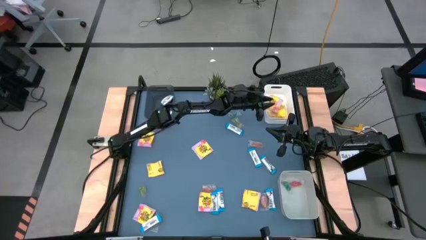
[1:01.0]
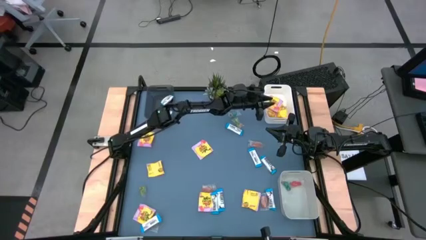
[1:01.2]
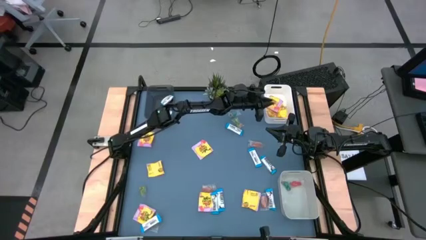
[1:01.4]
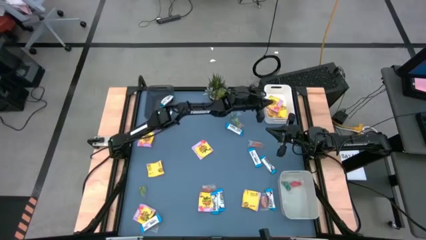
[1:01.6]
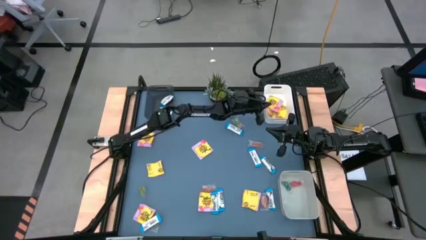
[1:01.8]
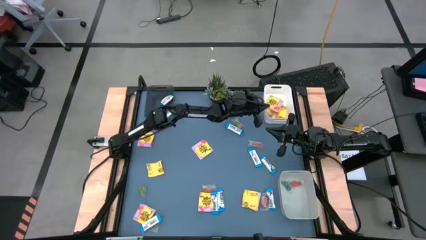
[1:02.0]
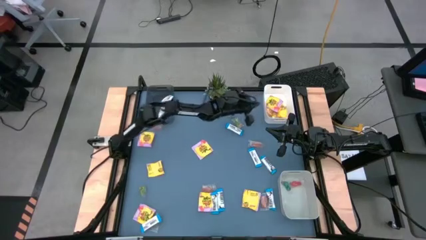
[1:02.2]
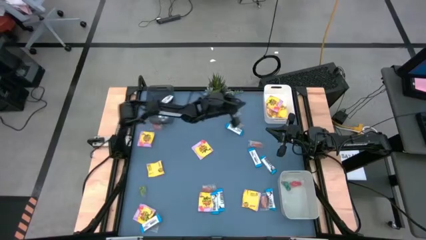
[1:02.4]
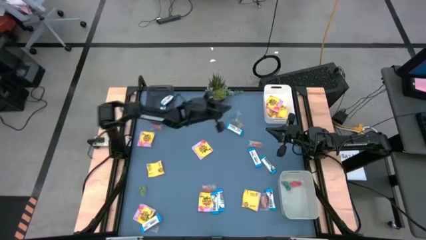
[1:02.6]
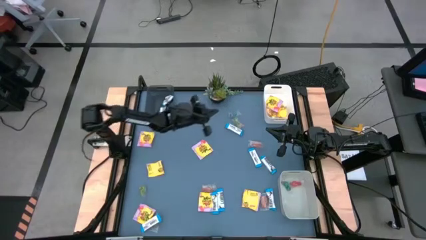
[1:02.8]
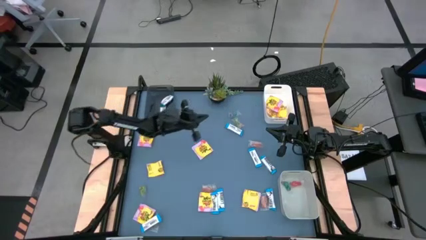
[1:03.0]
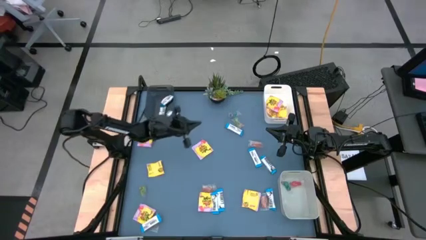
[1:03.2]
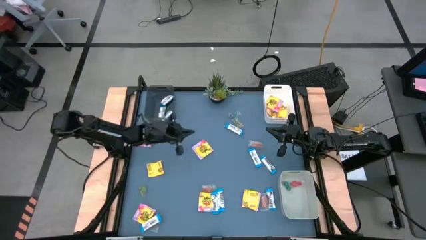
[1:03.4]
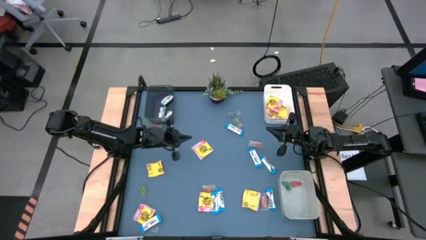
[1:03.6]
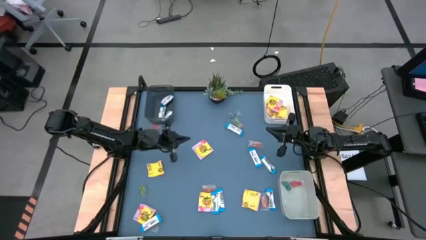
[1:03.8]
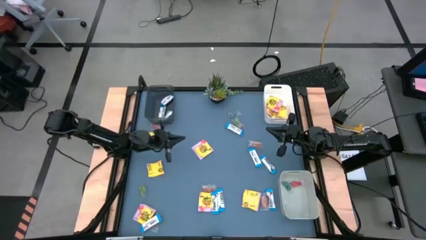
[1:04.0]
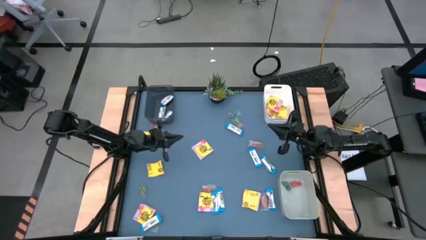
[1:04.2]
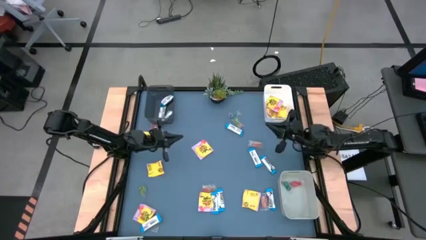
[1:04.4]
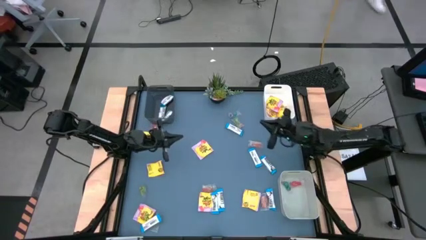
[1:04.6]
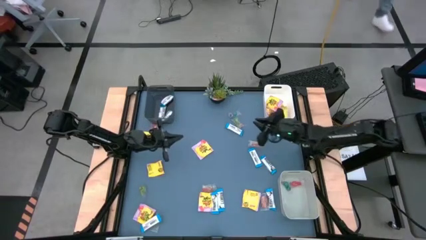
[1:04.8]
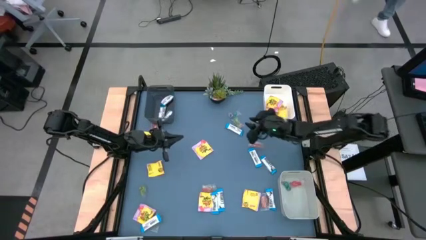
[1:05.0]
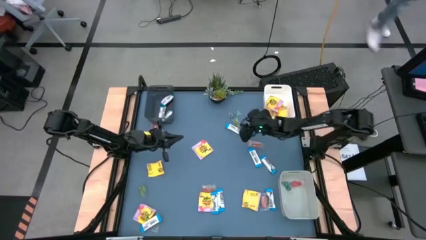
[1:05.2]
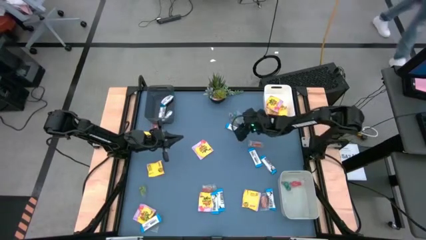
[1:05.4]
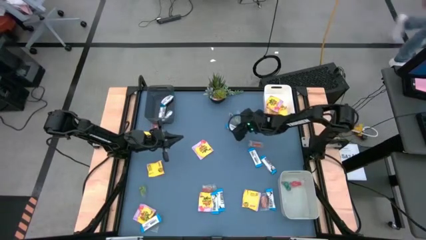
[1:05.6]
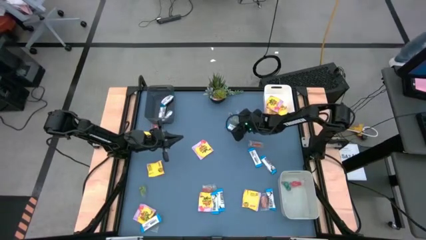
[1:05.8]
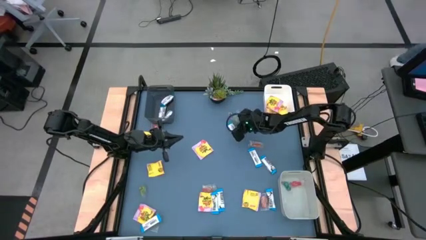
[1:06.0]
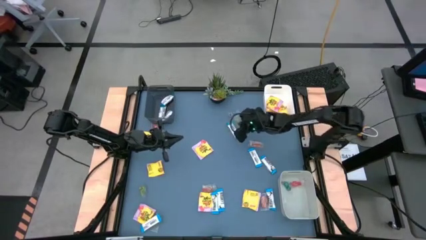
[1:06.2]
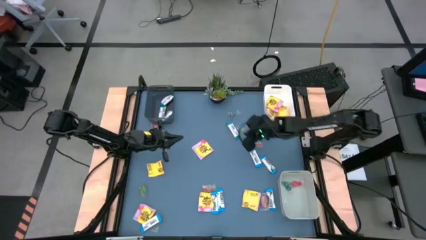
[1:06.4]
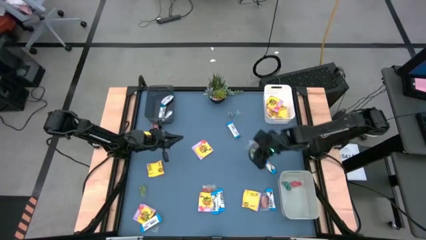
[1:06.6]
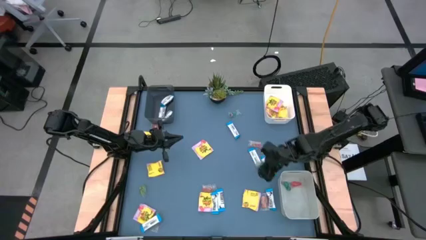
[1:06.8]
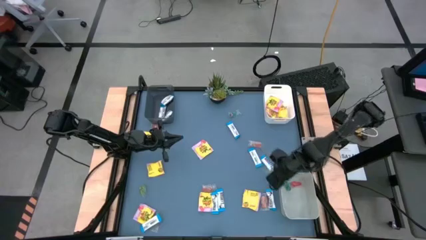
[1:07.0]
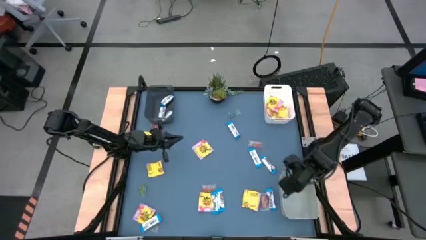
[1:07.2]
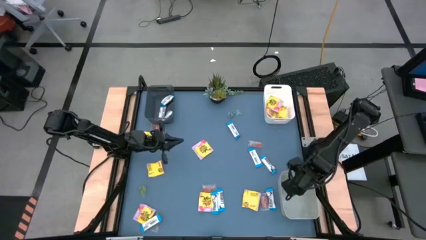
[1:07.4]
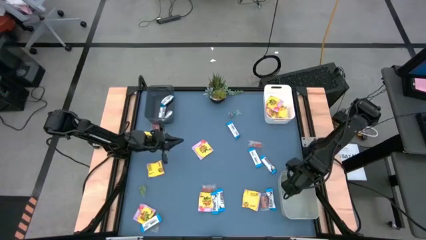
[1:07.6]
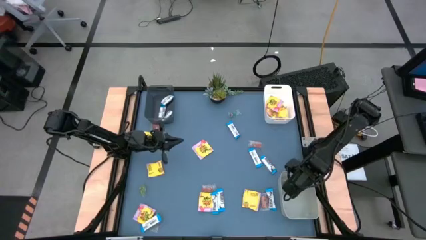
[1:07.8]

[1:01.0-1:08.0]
Task: Sort candy
Put the top light-green gummy candy into the grey bin

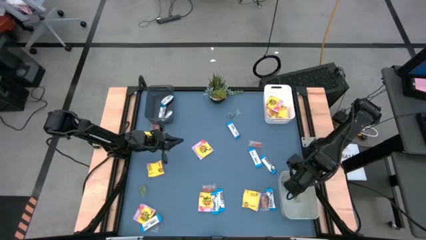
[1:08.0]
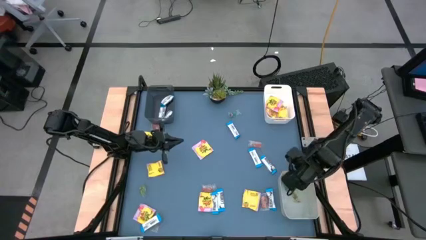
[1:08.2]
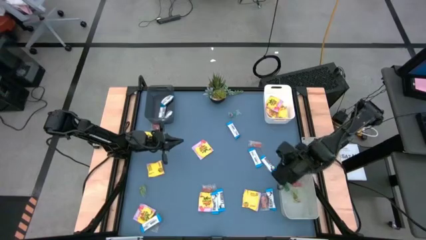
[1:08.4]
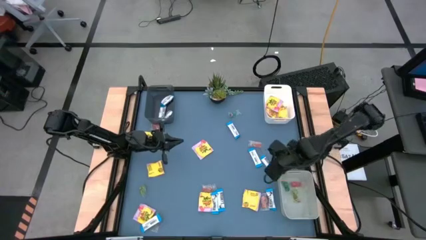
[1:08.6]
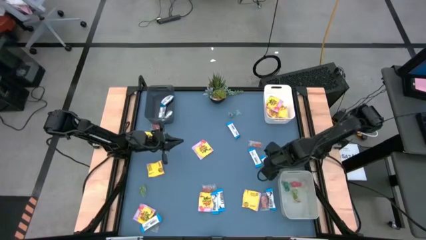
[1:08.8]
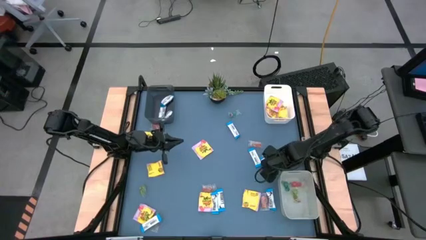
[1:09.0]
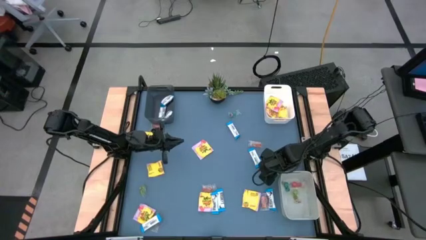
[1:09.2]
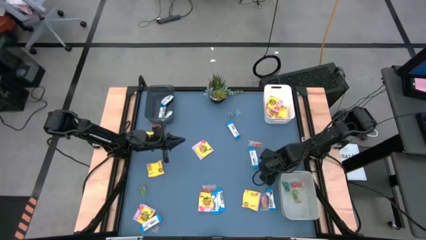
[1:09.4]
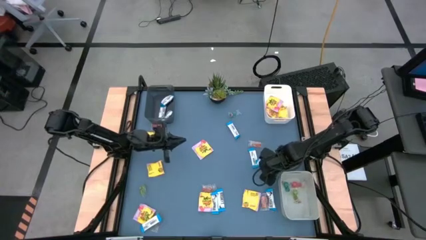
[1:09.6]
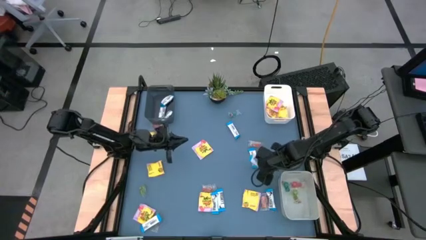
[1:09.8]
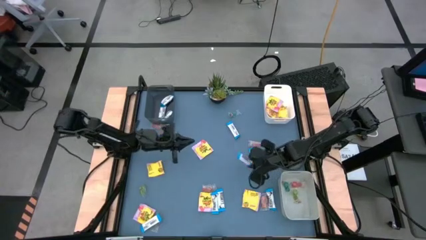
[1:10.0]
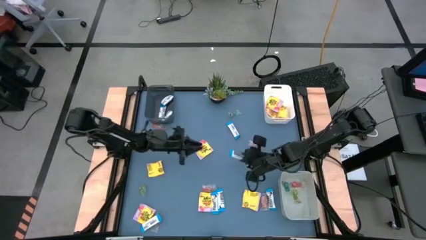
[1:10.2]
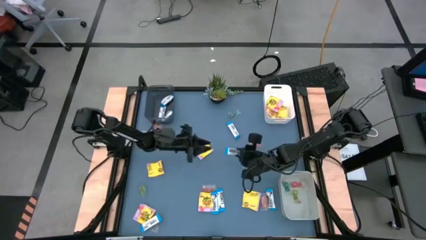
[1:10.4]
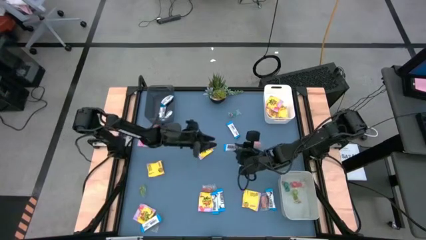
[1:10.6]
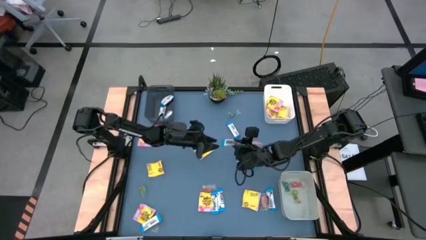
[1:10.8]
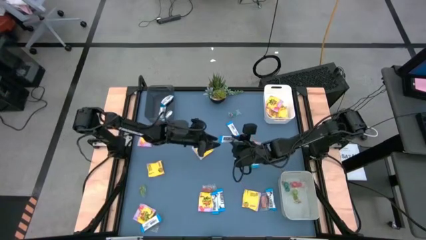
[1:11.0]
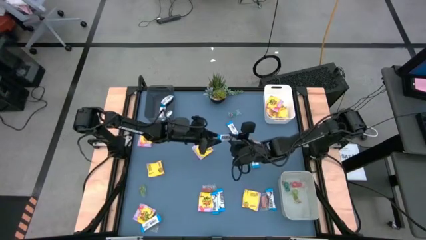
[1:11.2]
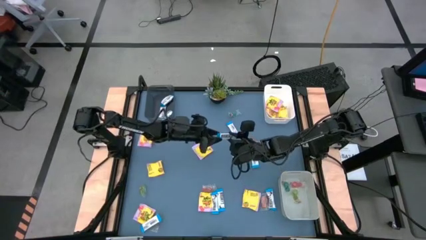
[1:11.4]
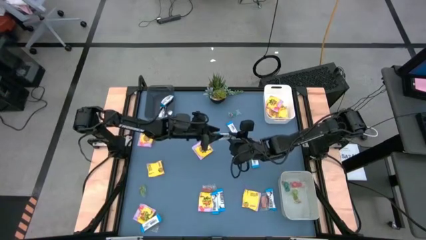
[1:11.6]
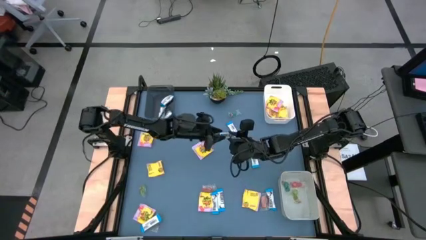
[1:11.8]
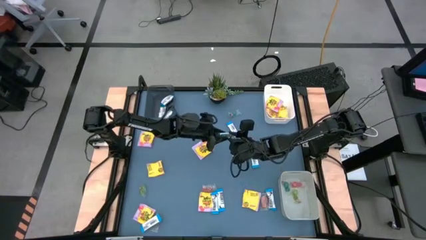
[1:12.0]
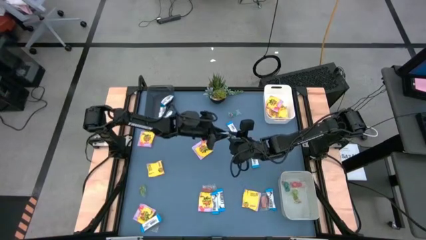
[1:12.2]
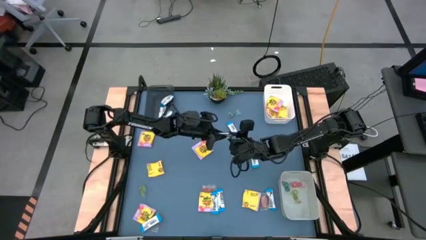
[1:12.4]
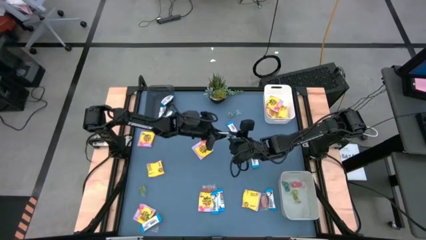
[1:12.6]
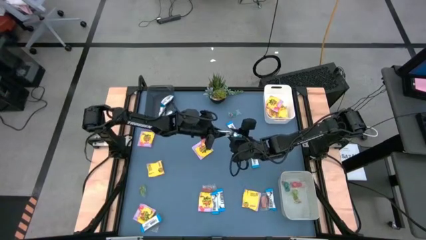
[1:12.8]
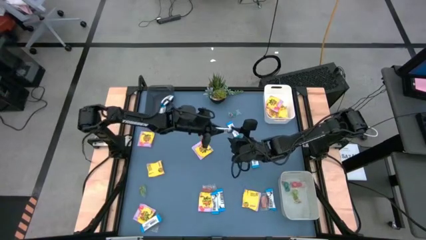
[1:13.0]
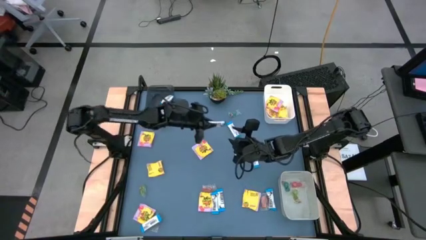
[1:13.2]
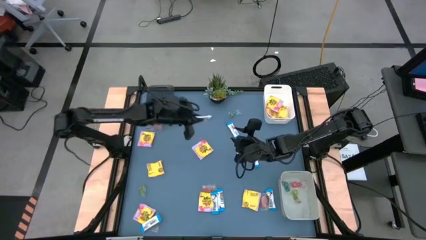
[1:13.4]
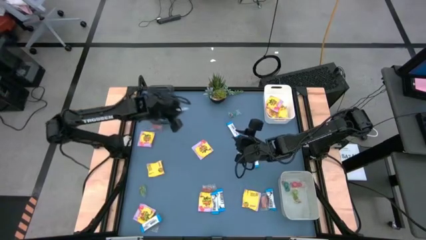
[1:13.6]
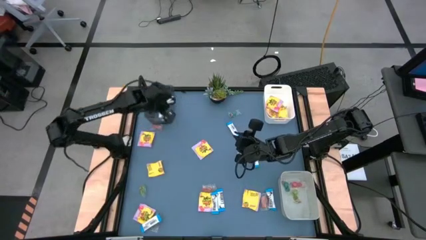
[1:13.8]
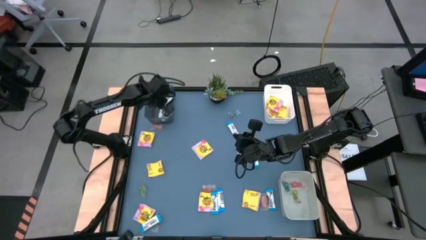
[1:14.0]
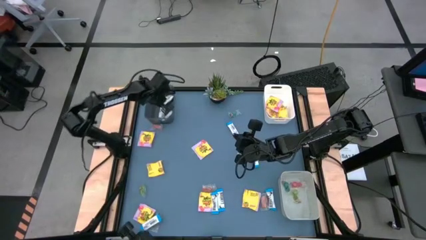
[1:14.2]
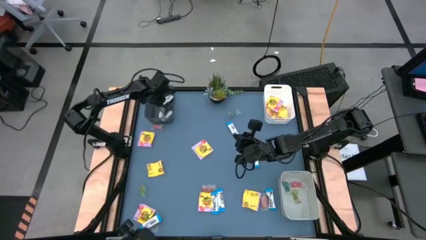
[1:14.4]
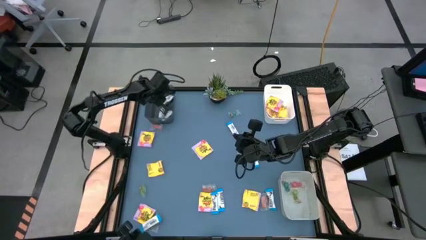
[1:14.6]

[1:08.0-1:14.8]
Put the middle right white chocolate bar into the transparent black bin

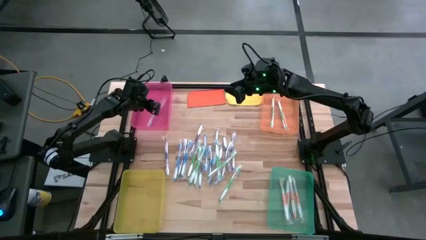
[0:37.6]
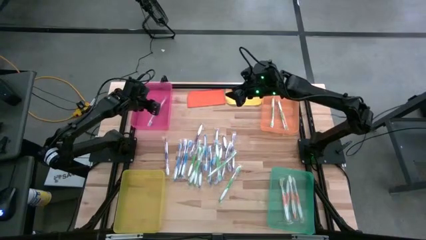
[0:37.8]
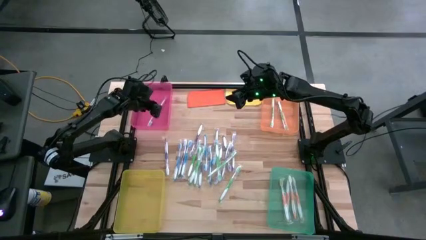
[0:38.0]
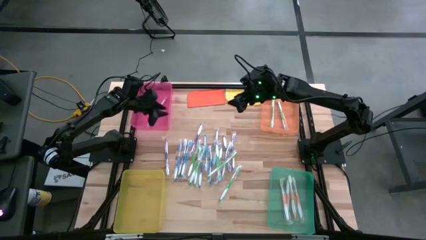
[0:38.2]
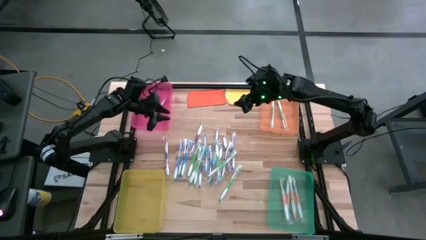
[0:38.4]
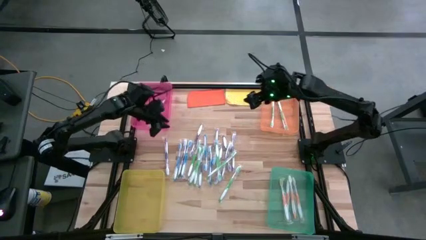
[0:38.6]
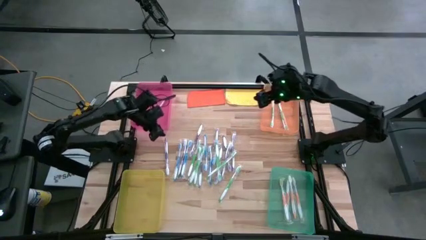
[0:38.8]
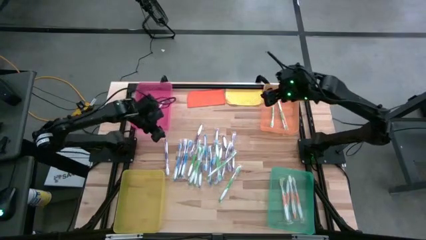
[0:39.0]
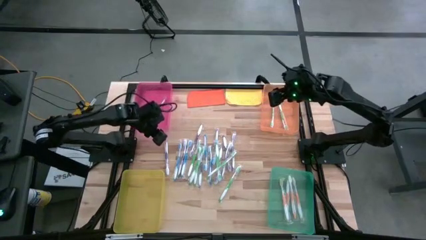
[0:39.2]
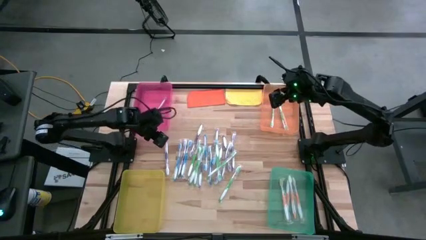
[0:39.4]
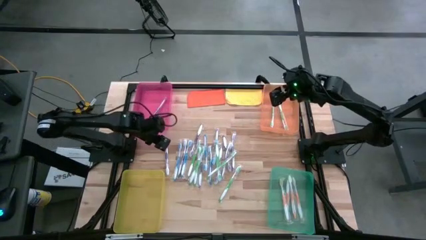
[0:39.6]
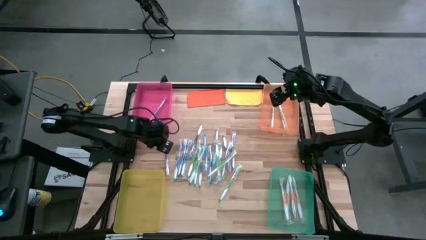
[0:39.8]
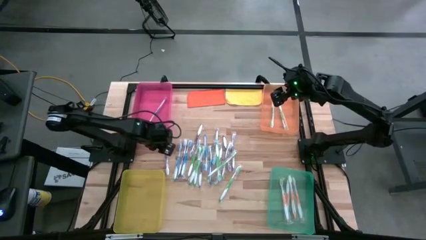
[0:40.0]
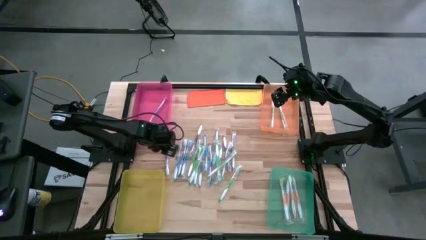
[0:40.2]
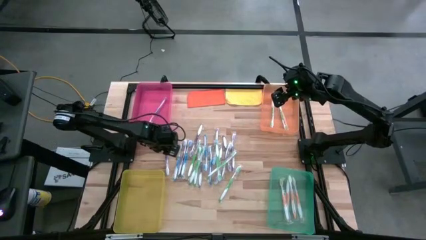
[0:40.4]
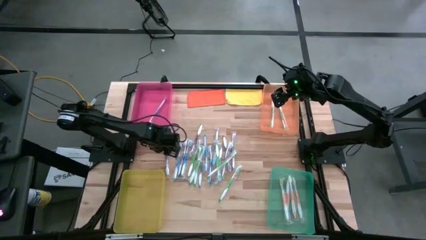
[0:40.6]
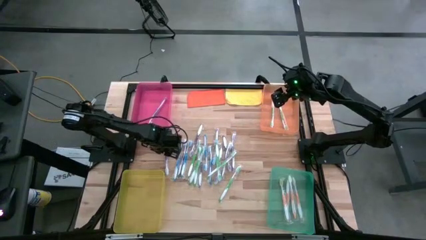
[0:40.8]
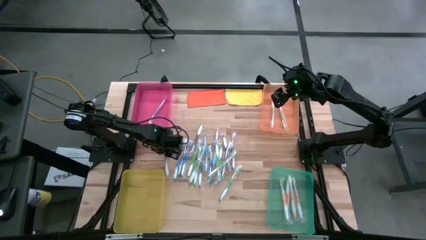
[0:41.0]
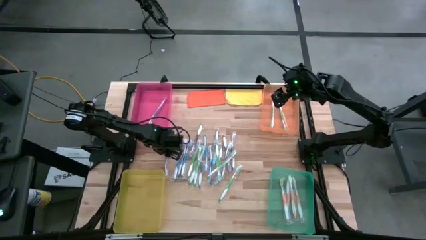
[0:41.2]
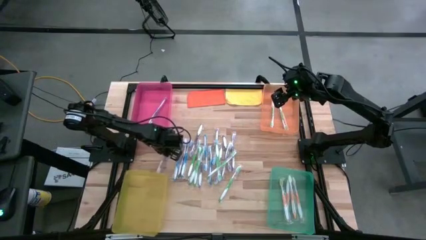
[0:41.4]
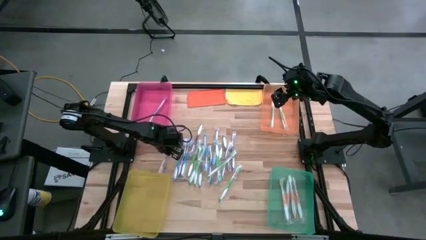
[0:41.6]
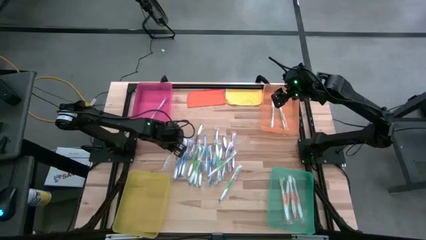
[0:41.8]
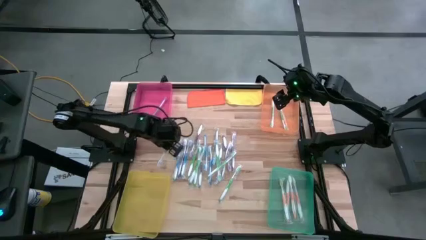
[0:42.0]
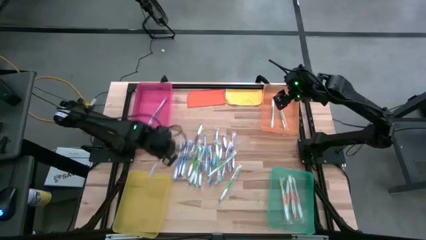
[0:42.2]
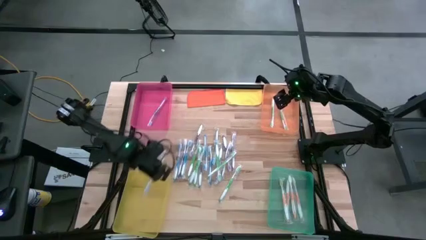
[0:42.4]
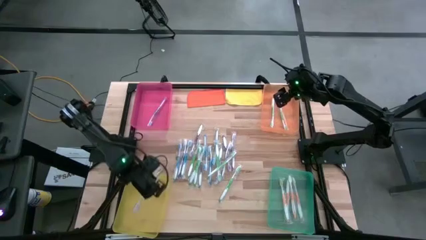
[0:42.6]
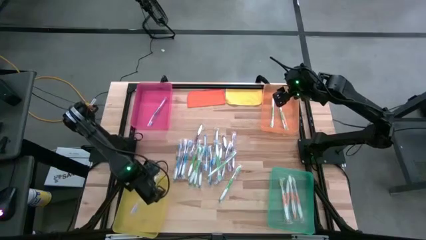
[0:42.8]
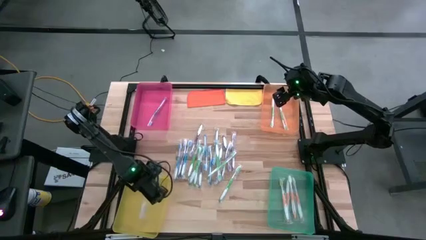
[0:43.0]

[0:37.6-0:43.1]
Task: Pick & Place Toothbrushes
Put the purple toothbrush into the yellow bin
